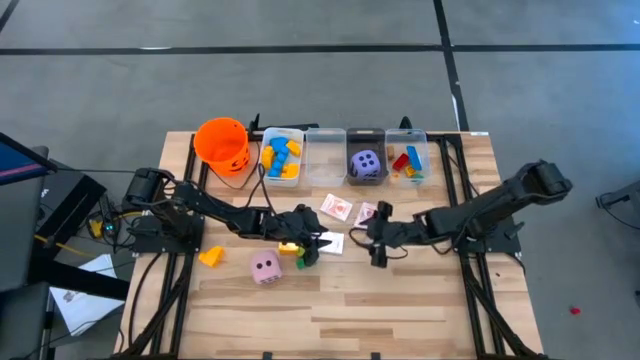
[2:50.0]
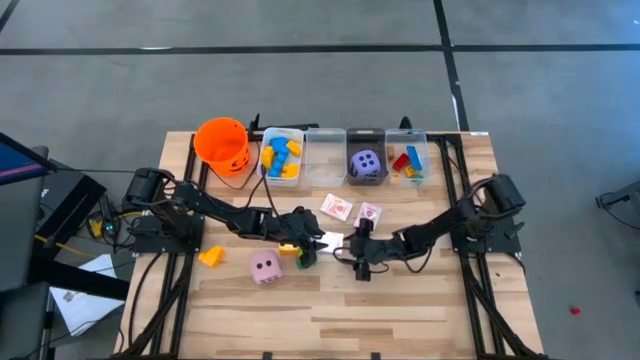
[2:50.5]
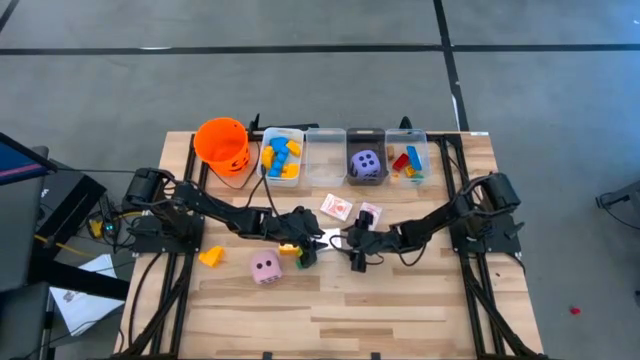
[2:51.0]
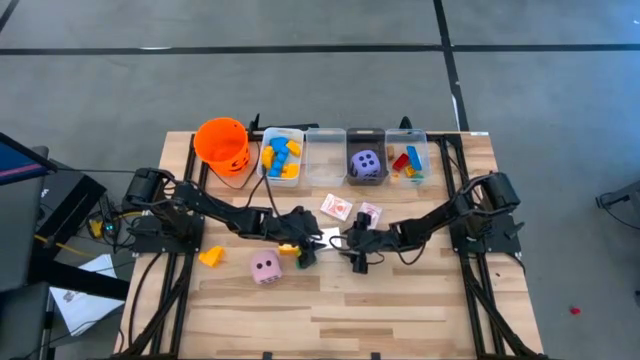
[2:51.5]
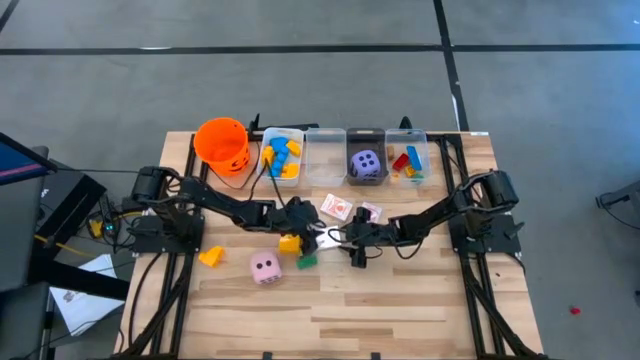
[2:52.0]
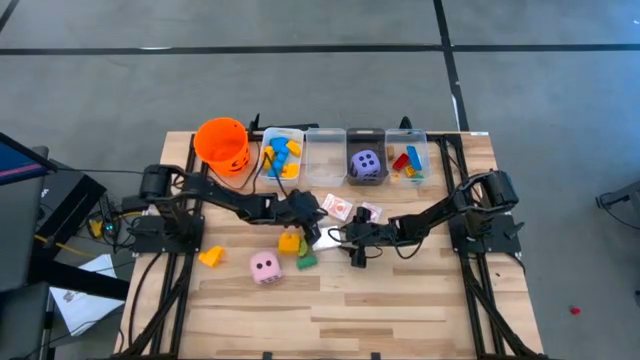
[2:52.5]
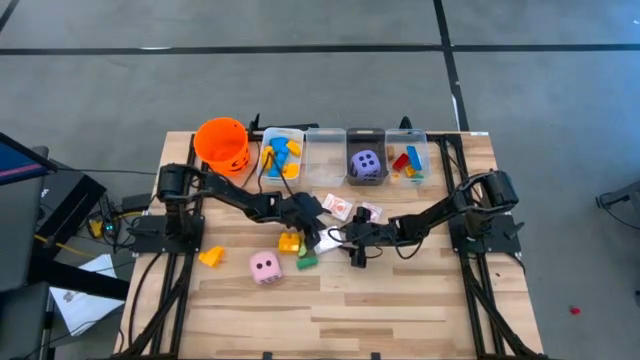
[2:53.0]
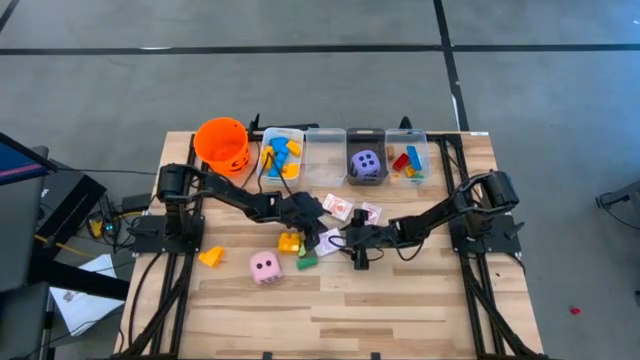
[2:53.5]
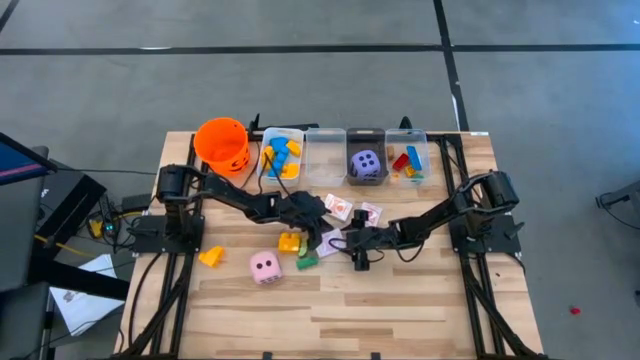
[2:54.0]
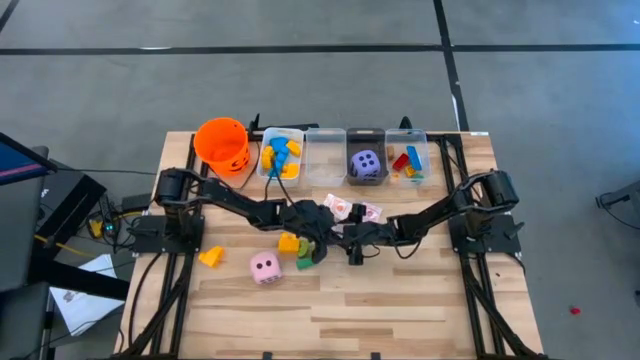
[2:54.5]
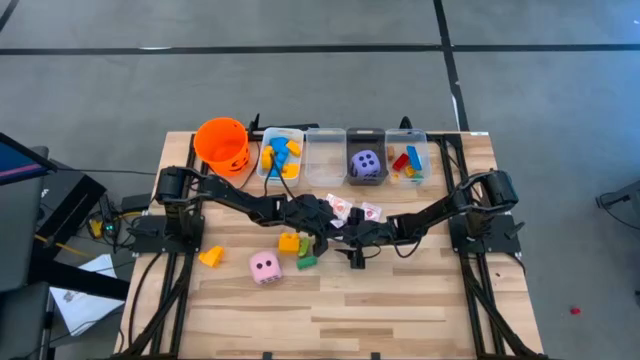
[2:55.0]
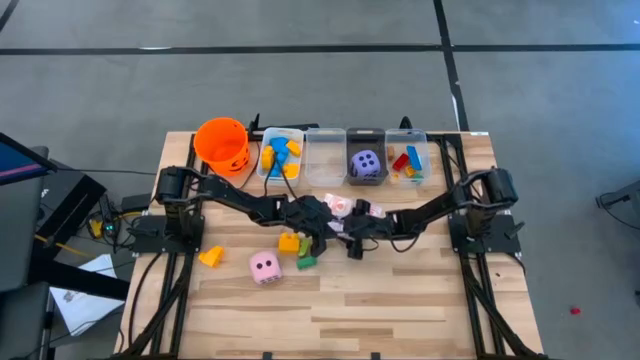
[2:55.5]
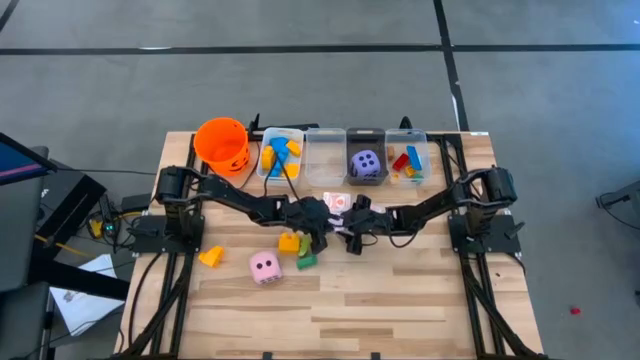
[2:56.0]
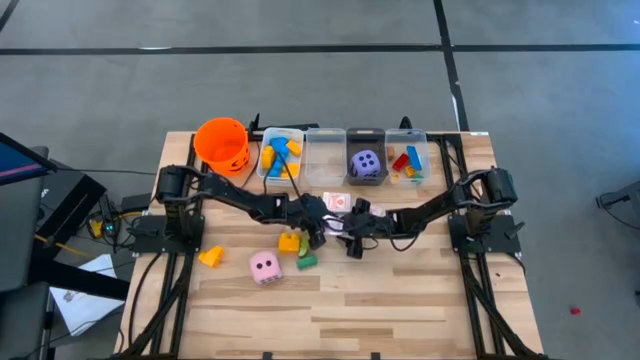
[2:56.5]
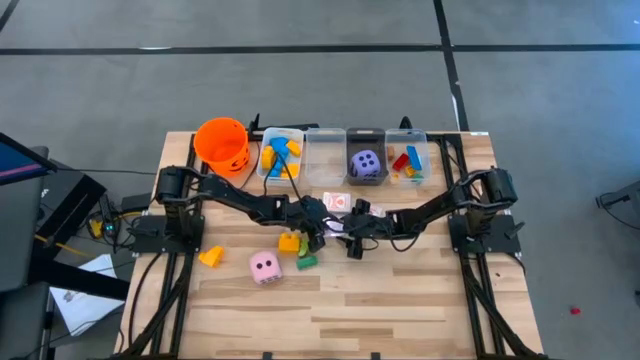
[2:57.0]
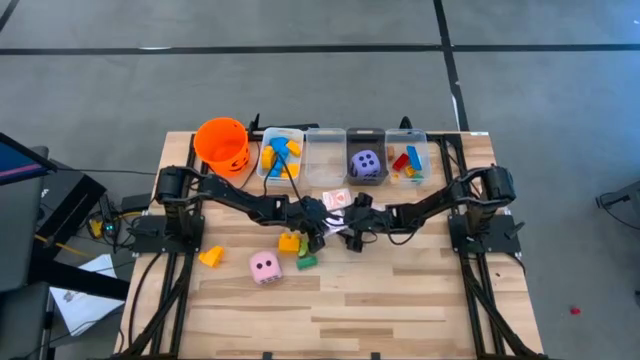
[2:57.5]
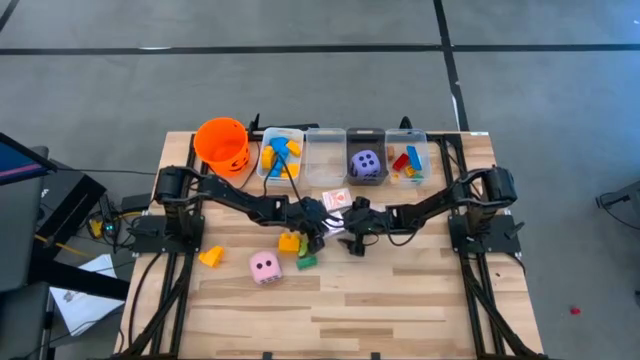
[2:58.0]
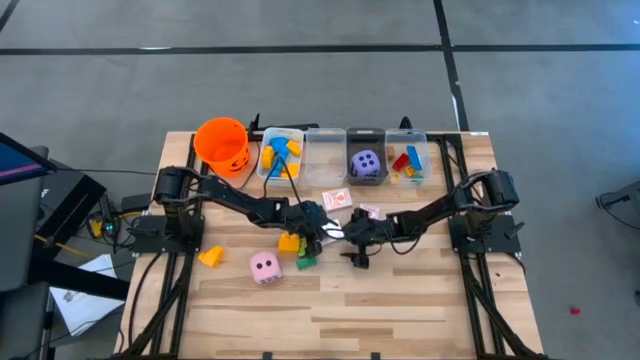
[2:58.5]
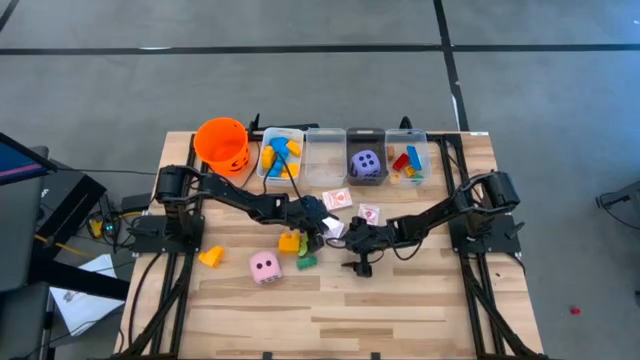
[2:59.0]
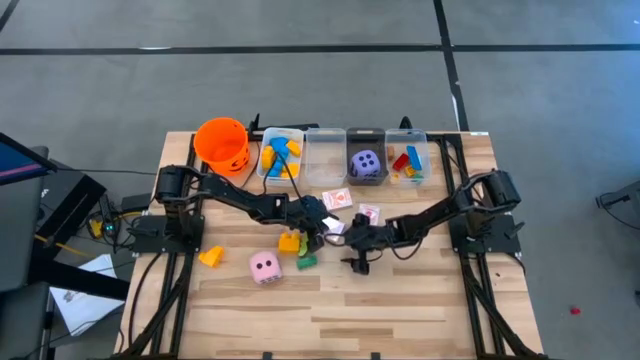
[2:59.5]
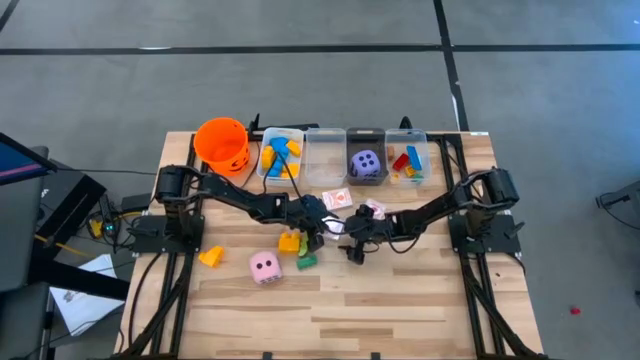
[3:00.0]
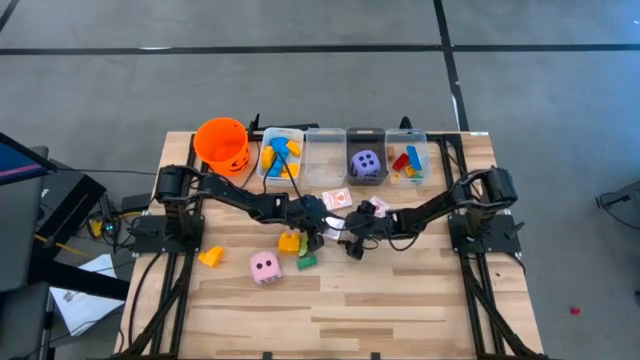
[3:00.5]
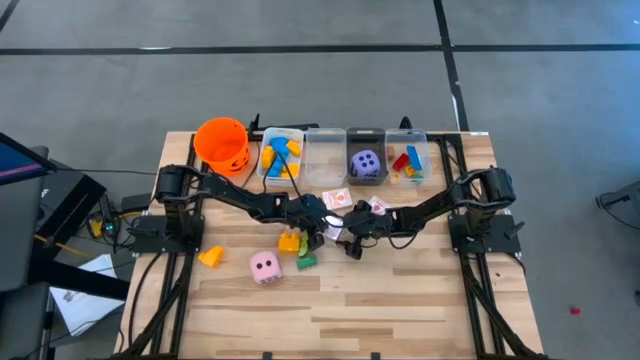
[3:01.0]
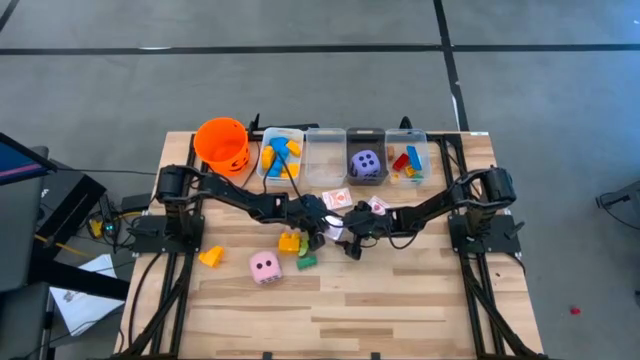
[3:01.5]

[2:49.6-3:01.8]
Task: Pick & Place Toys
Put the pink deck of cards into the left transparent bin

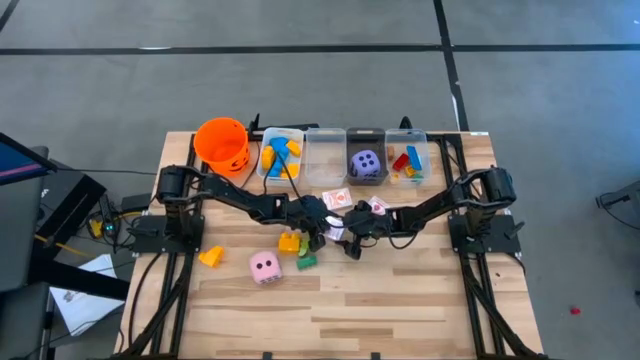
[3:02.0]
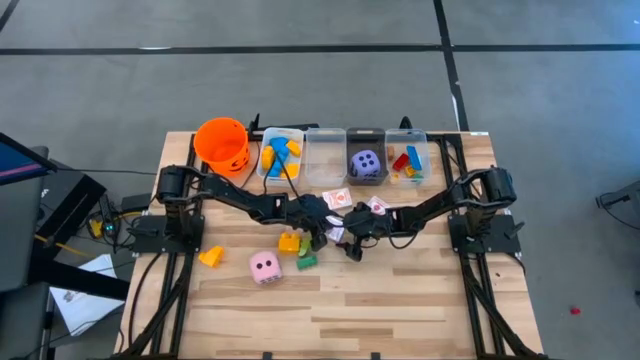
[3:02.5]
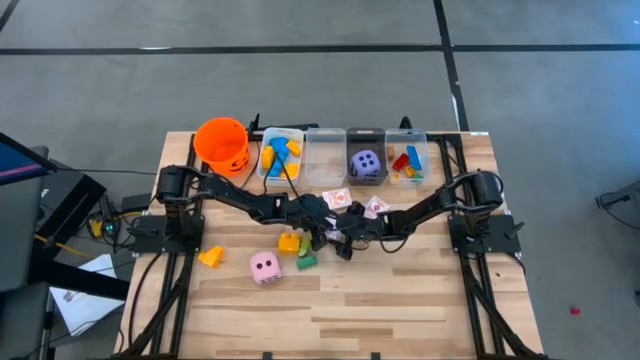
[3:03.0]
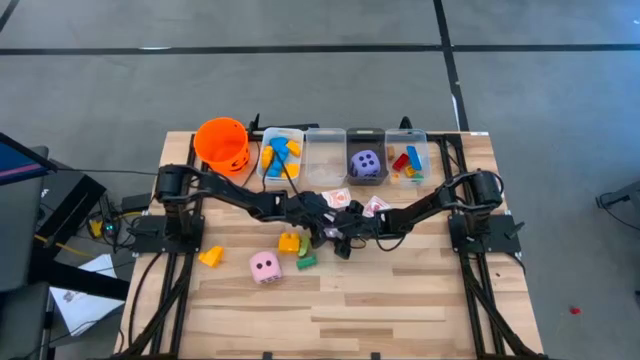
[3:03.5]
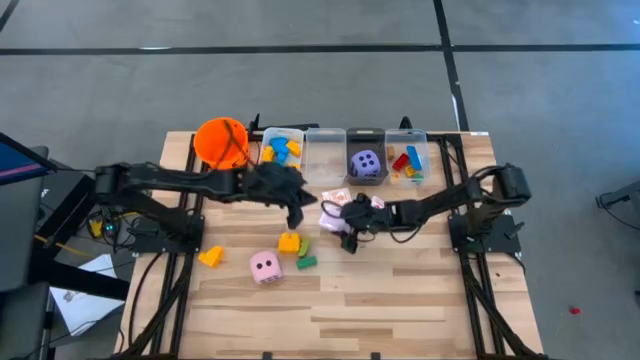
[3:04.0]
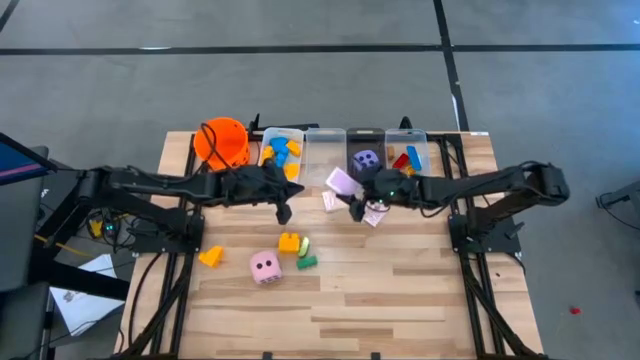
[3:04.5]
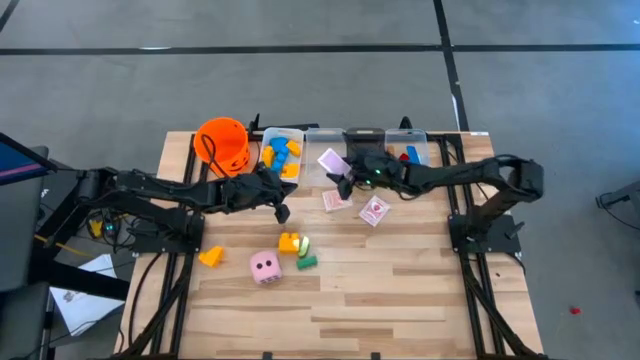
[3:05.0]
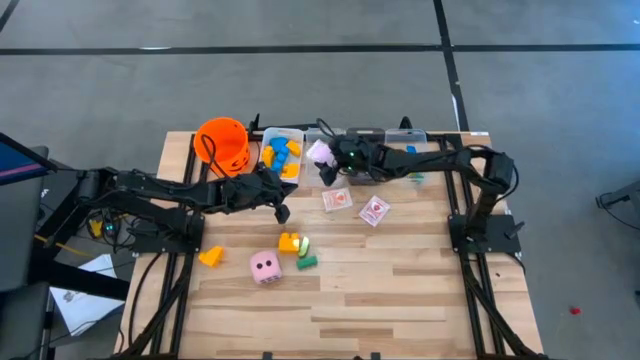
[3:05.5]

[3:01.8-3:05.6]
Put the pink deck of cards into the left transparent bin

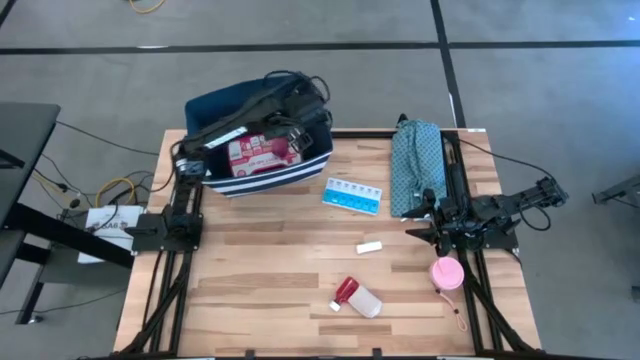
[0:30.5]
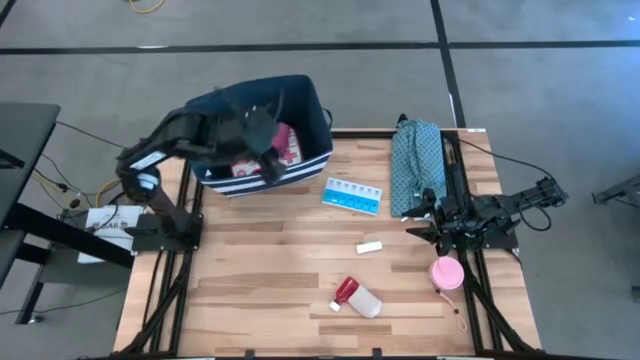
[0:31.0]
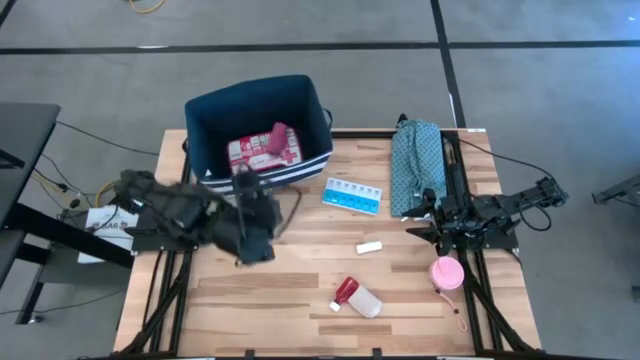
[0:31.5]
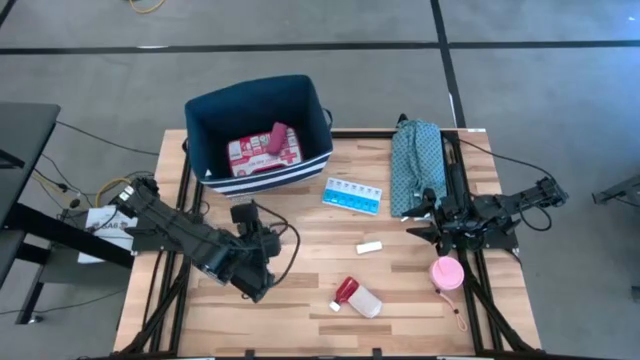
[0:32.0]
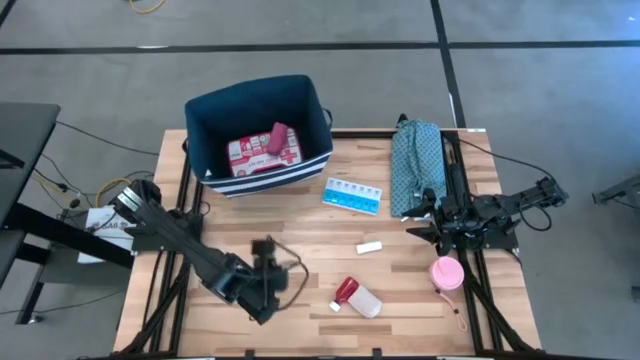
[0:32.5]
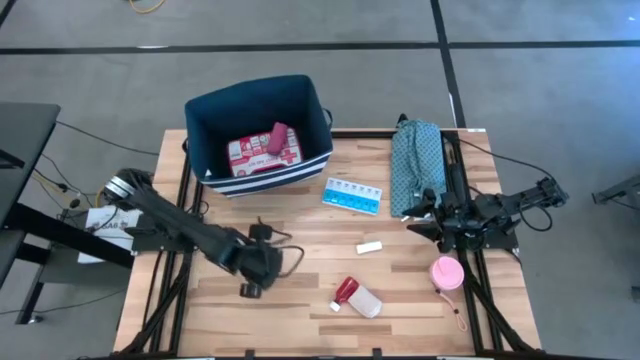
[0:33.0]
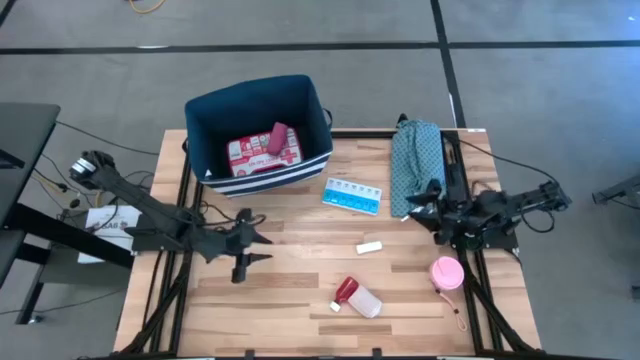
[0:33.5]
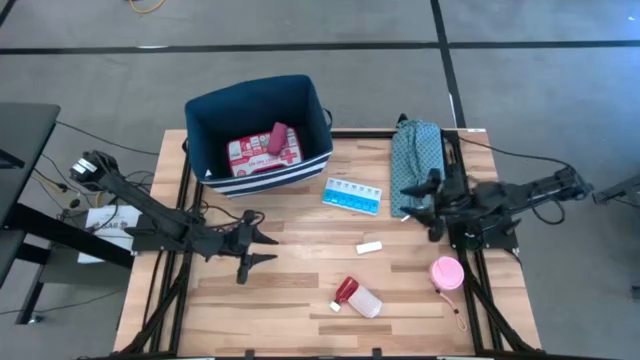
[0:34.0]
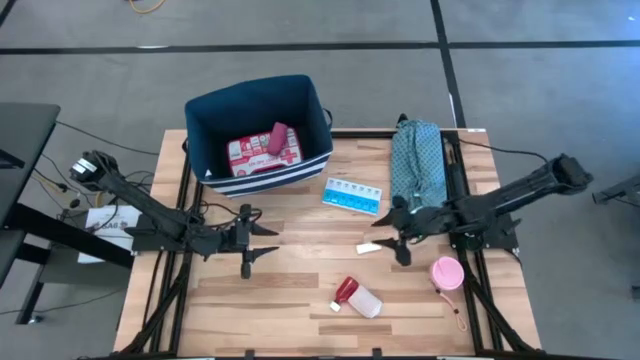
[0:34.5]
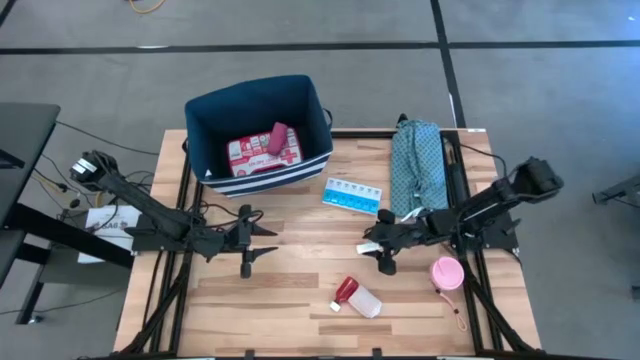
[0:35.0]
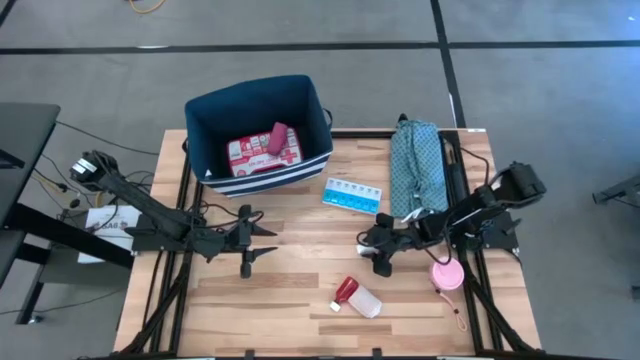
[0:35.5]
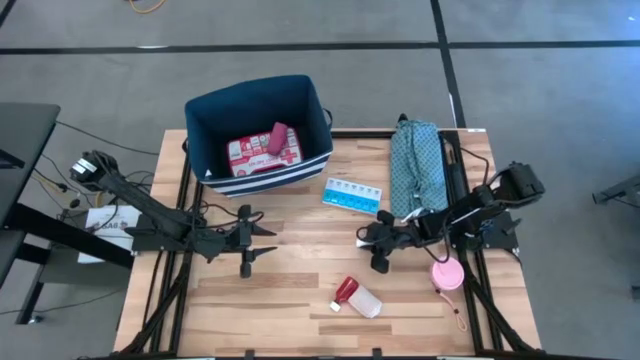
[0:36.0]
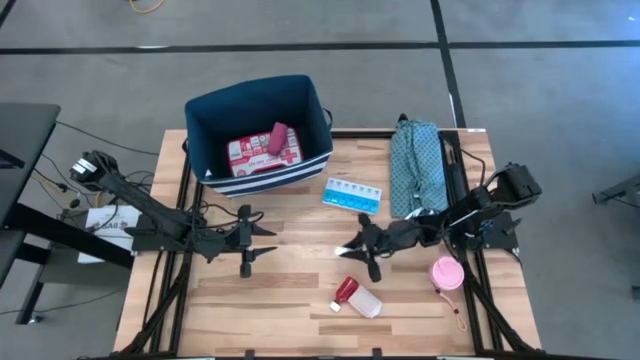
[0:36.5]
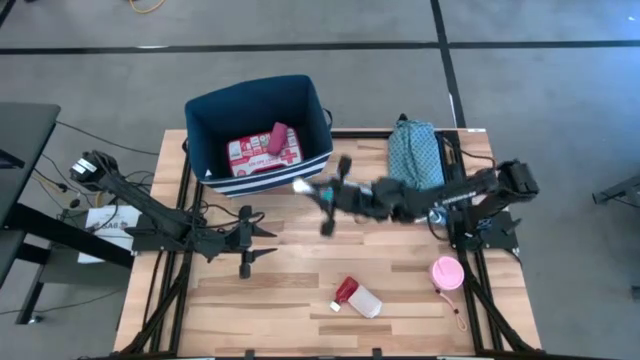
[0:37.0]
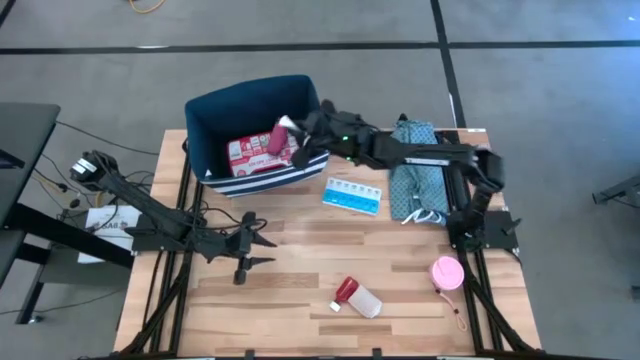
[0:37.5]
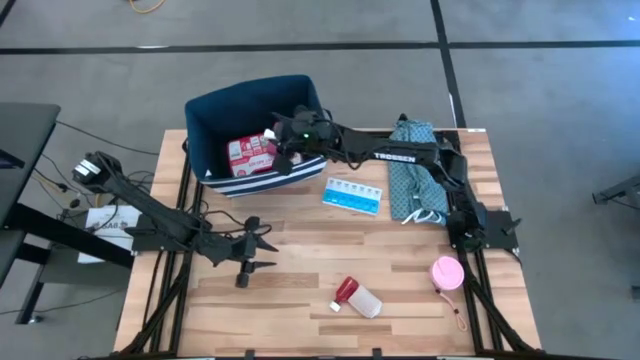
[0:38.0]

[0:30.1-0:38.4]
Task: Pick & place medical supplies in basket/bin
Put the white gauze into the blue bin
